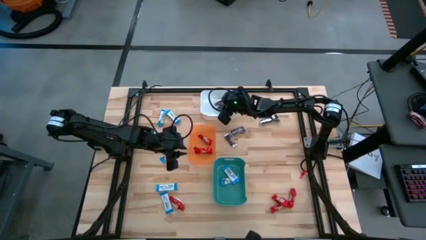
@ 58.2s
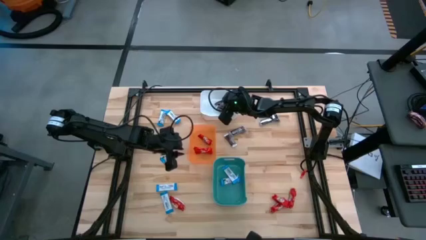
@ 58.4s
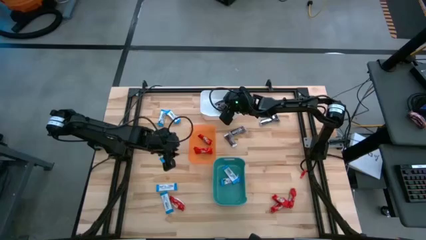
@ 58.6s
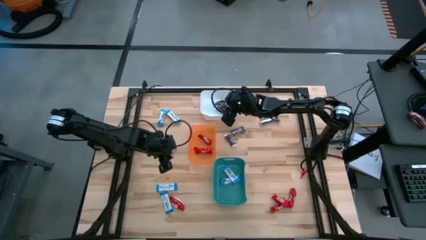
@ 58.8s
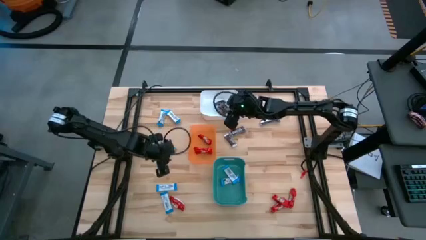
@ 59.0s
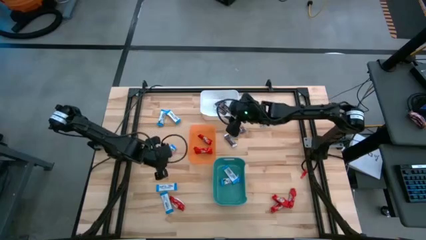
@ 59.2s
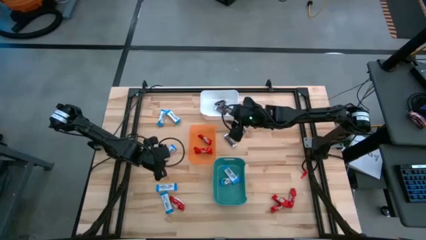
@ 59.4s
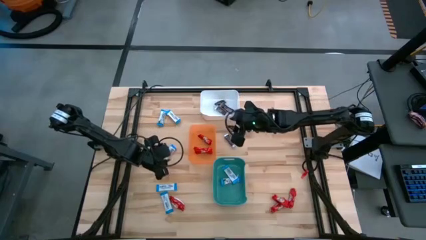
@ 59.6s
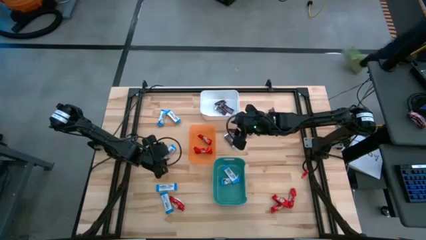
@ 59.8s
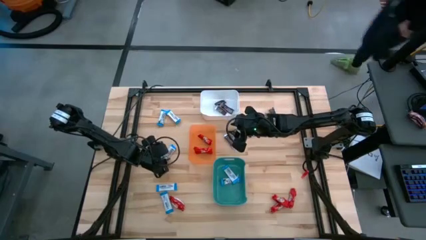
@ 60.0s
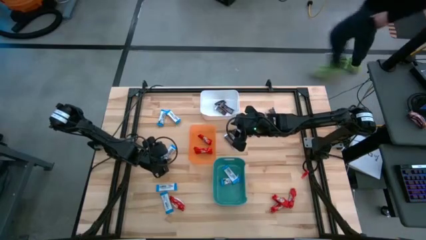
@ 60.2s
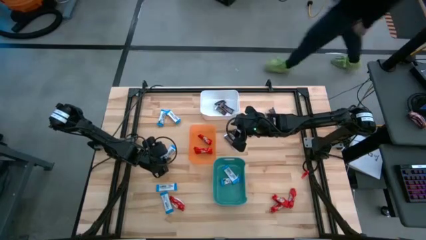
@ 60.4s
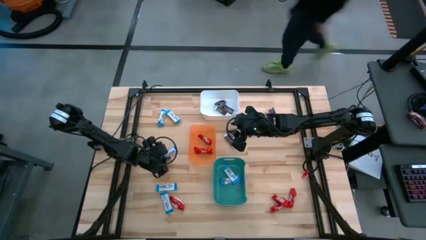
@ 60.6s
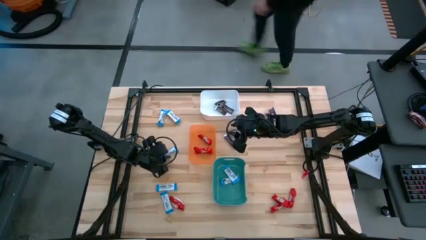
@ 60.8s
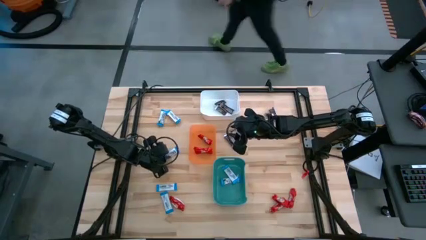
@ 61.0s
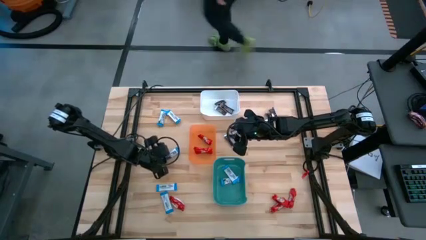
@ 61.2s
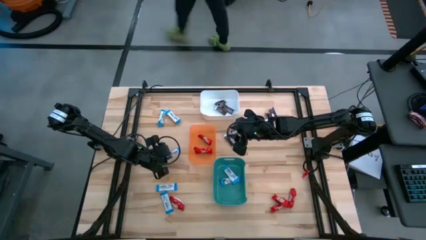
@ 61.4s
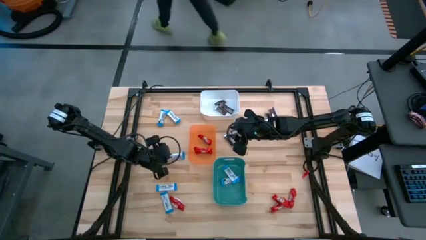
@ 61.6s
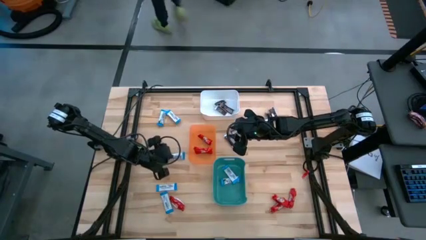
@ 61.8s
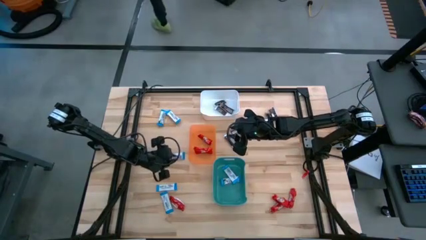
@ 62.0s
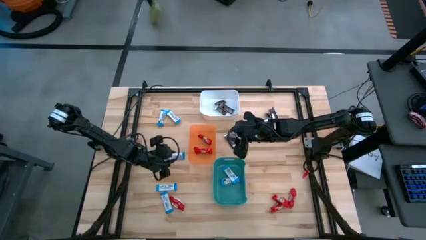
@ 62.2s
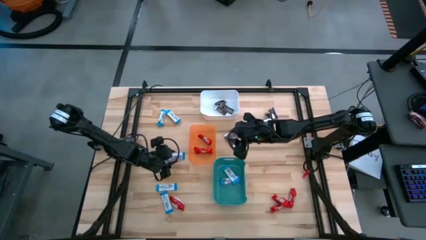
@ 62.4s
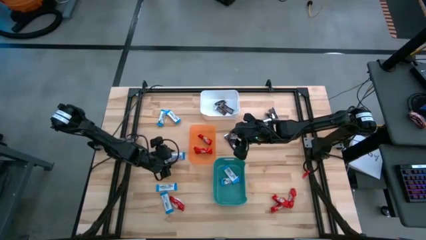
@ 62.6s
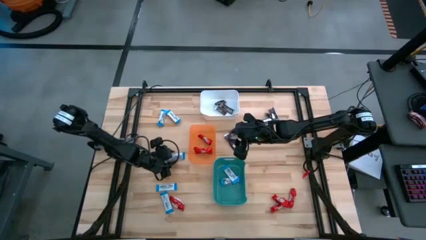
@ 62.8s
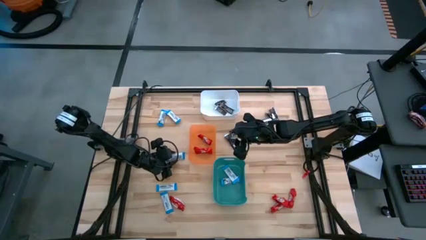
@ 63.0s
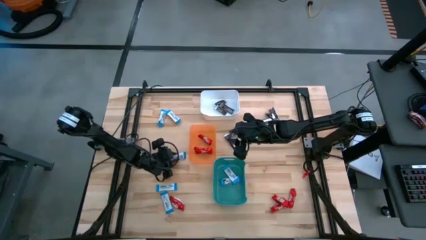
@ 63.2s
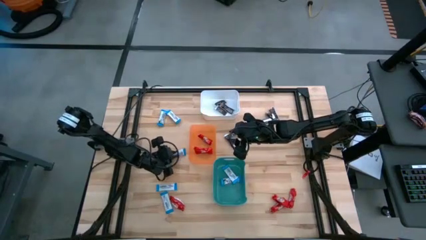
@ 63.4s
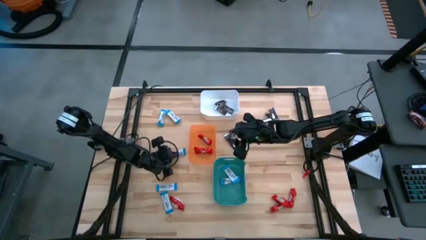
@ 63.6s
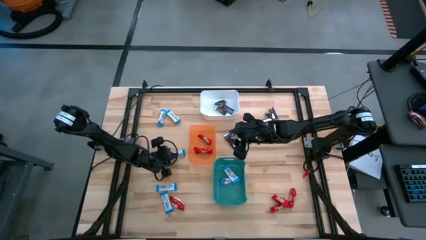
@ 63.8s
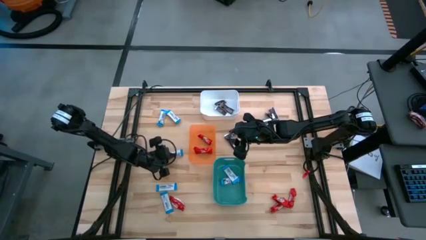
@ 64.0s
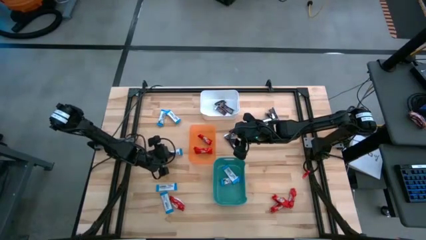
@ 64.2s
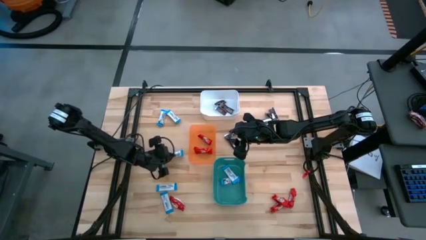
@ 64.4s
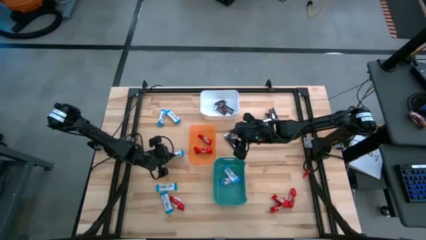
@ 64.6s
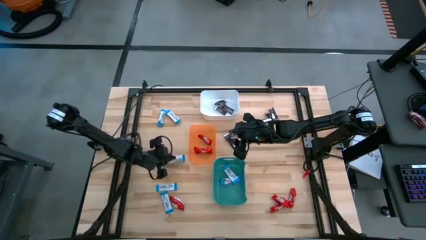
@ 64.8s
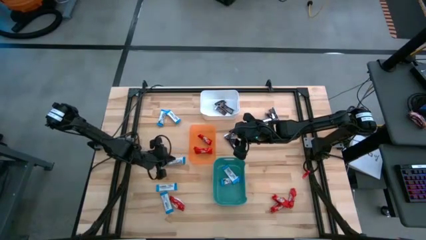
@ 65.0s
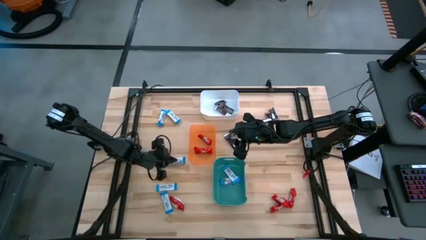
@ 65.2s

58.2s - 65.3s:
Task: Sort candy
Put the white chocolate bar into the green bin

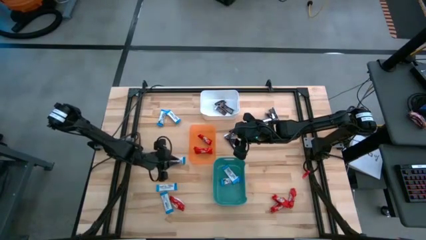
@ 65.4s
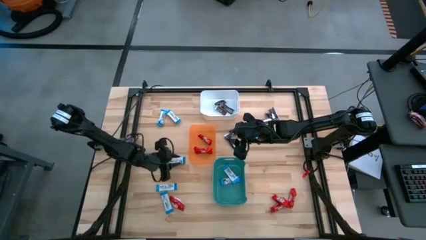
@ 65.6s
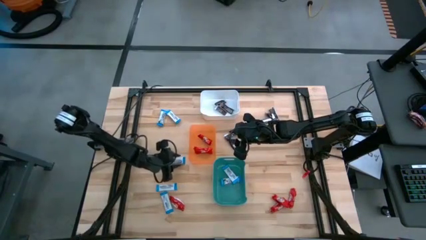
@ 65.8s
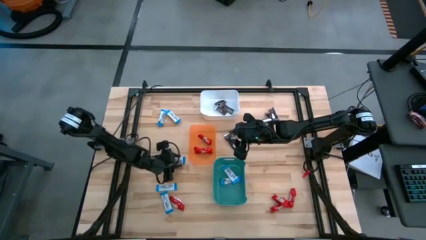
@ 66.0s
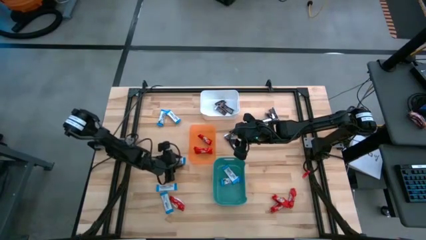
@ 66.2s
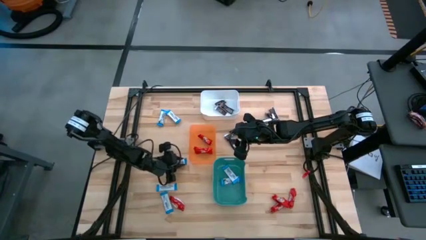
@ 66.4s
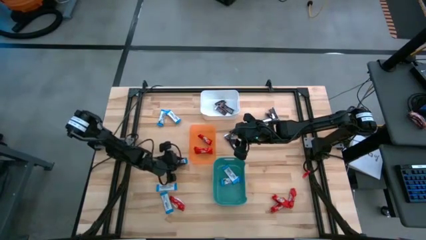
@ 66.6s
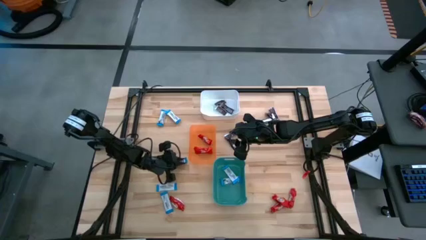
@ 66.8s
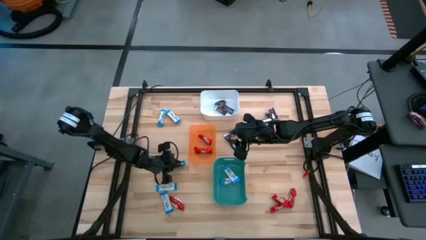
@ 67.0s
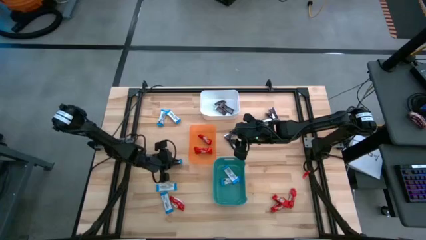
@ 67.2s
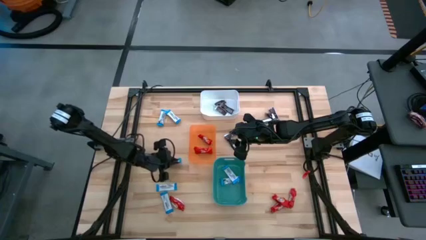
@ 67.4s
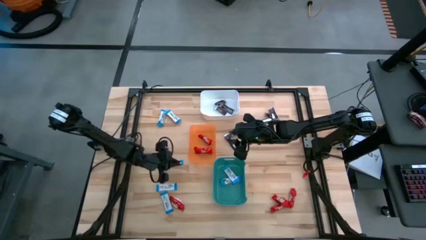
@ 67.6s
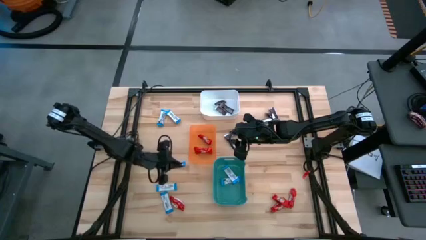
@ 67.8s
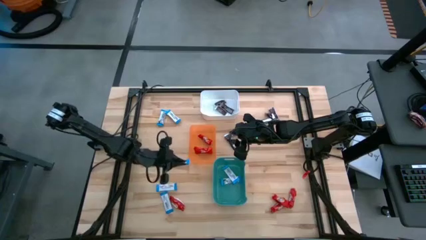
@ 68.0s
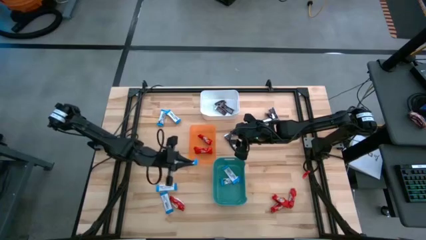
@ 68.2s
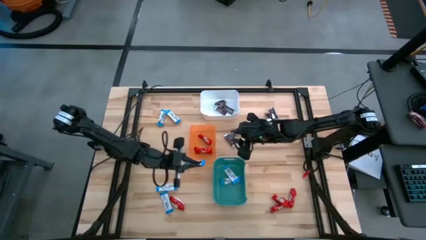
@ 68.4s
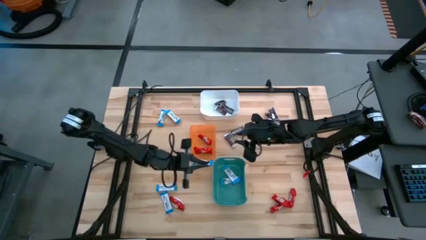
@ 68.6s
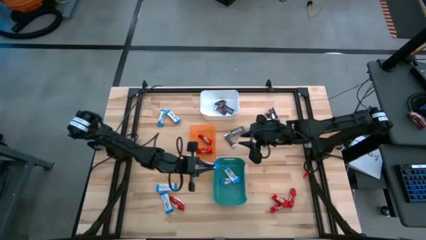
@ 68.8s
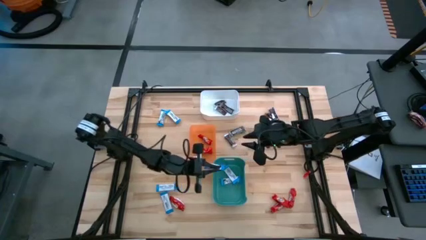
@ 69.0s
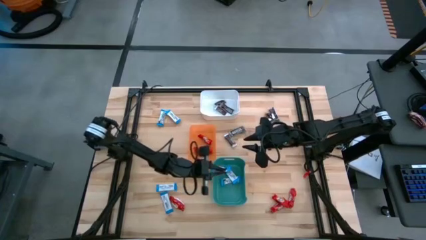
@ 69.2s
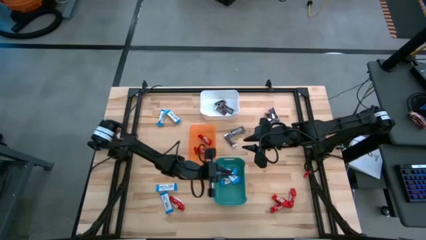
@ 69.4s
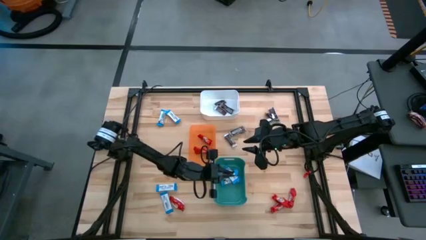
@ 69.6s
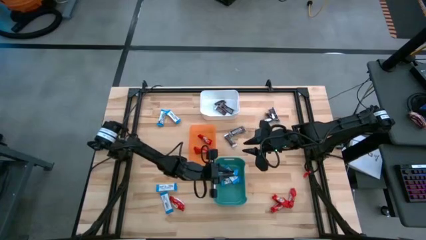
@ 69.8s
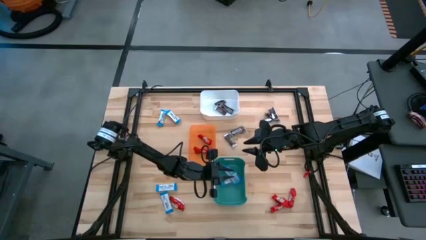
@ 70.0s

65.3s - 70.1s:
Put the white chocolate bar into the green bin

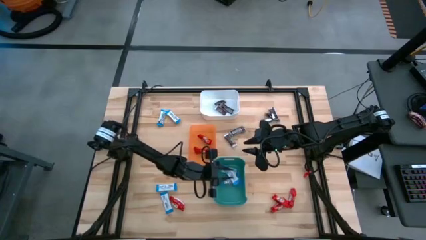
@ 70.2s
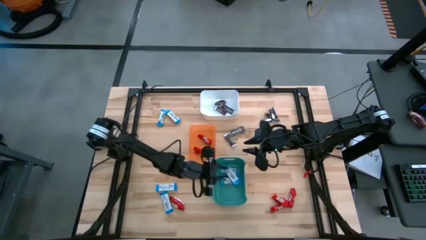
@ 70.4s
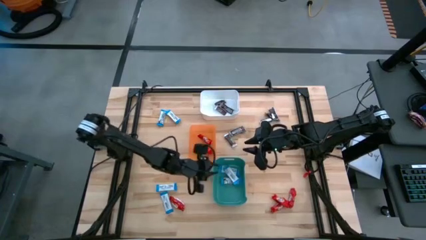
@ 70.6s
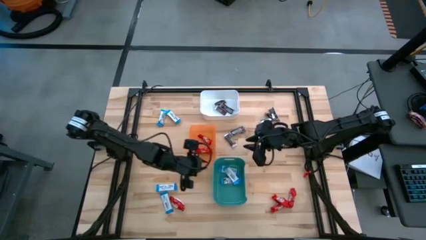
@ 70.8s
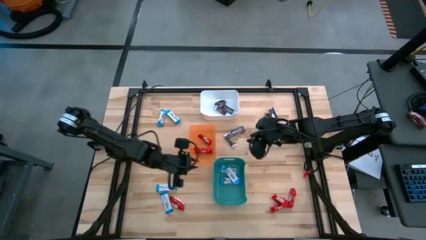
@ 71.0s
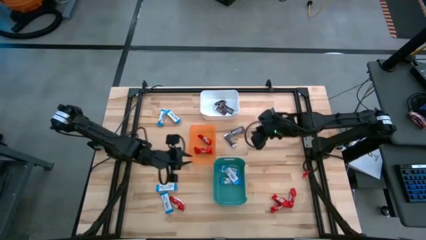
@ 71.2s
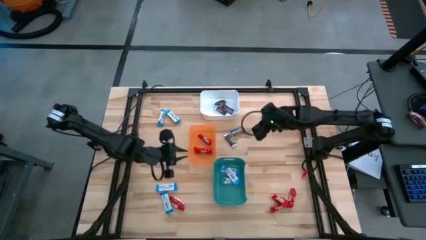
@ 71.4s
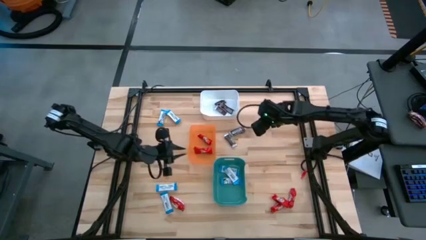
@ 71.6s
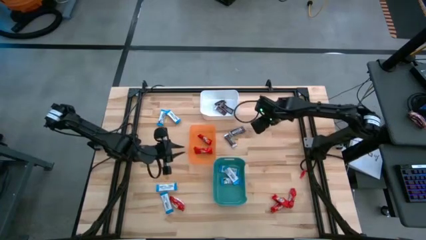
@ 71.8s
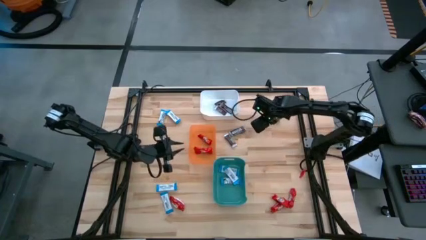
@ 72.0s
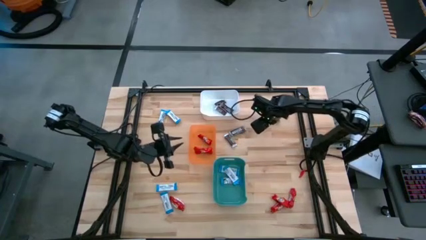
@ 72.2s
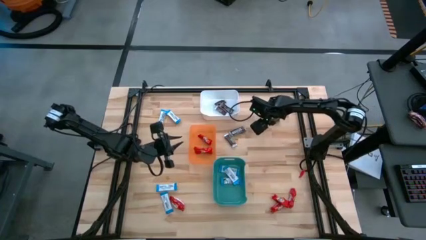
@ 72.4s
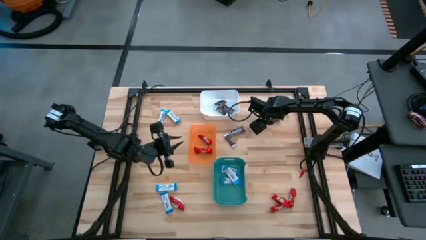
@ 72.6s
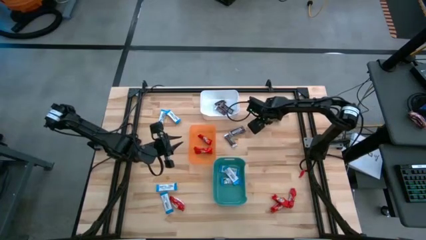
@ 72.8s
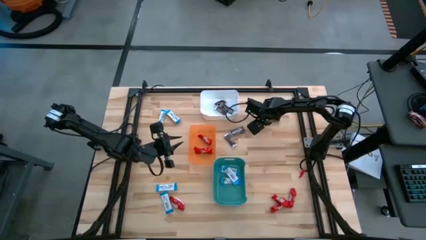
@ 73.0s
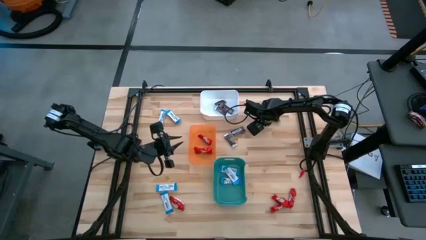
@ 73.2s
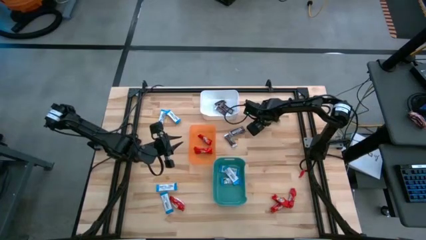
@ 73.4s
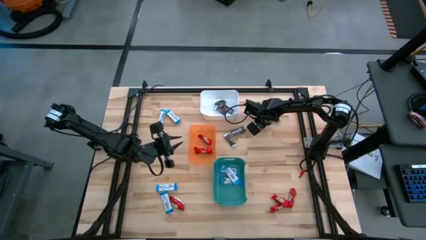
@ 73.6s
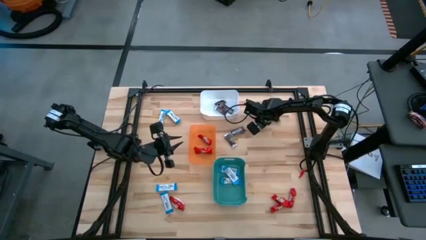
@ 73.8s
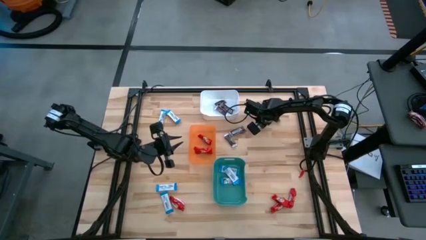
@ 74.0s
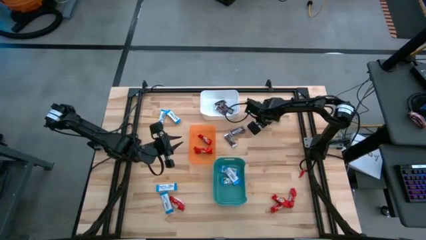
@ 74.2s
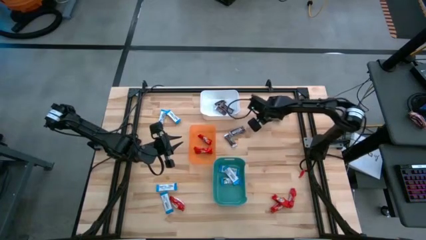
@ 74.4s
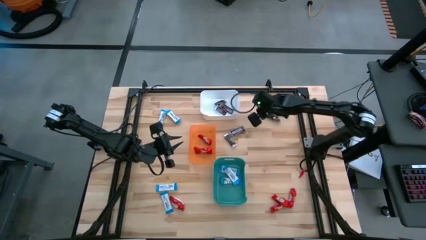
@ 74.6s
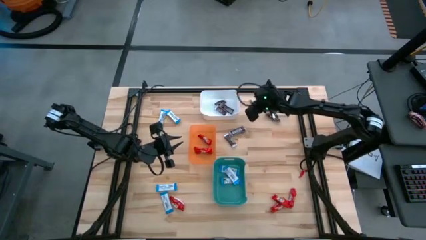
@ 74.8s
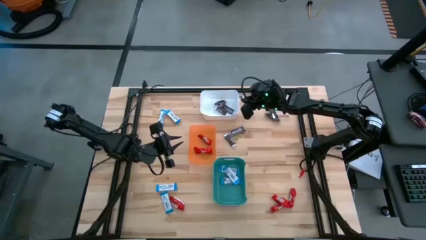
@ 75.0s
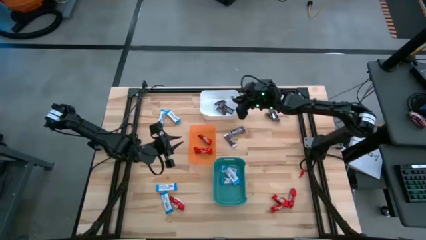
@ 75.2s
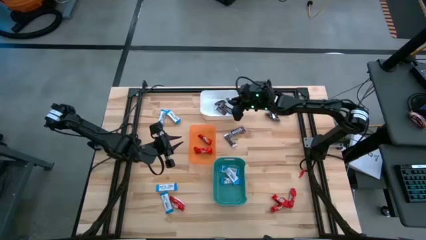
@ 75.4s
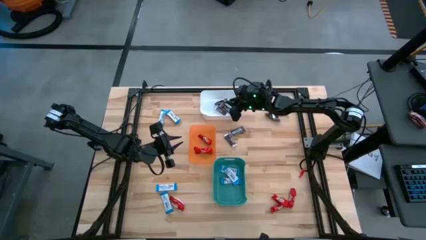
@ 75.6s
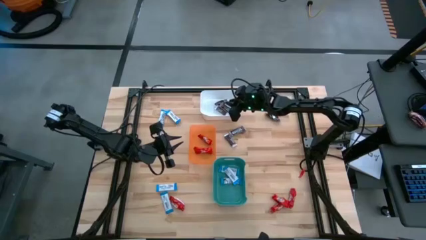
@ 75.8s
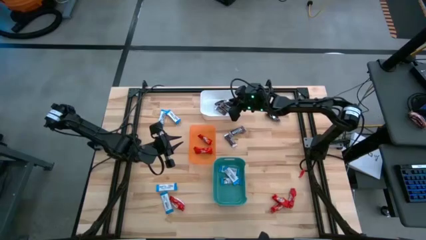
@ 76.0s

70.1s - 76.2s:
Put the brown chocolate bar into the white bin
